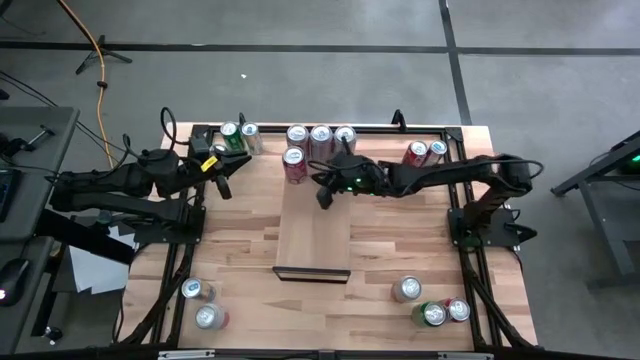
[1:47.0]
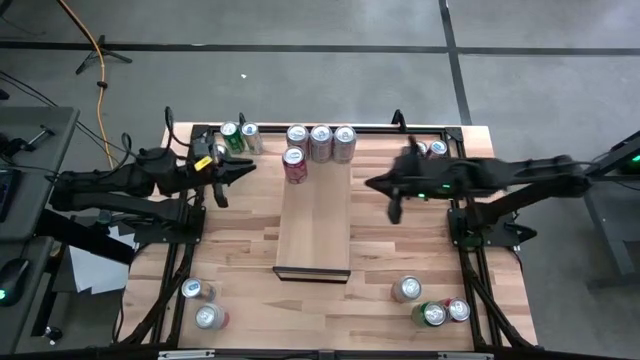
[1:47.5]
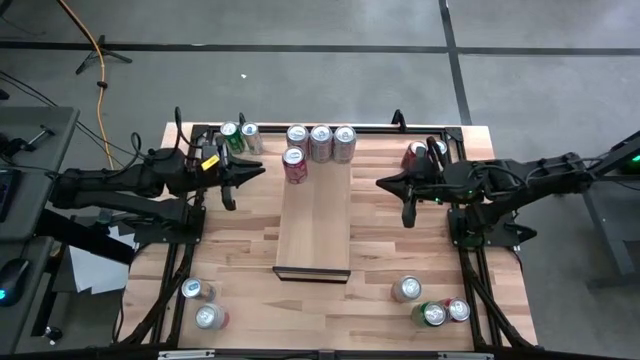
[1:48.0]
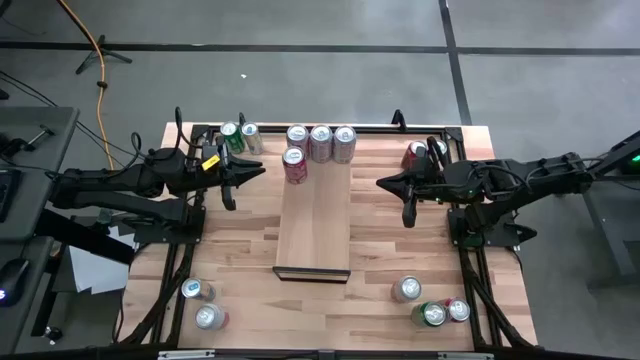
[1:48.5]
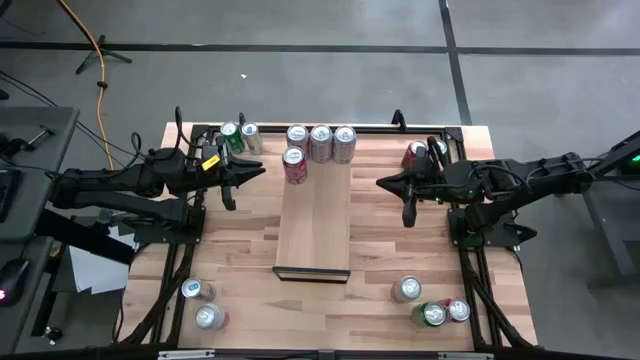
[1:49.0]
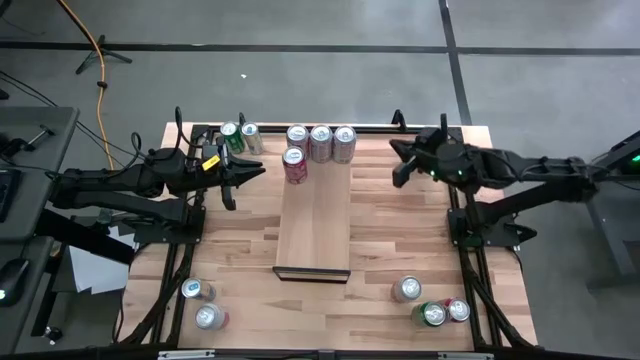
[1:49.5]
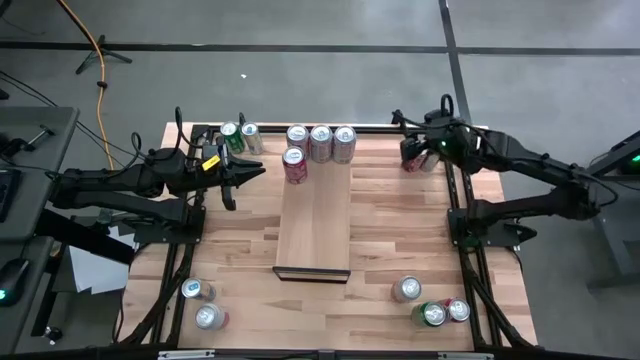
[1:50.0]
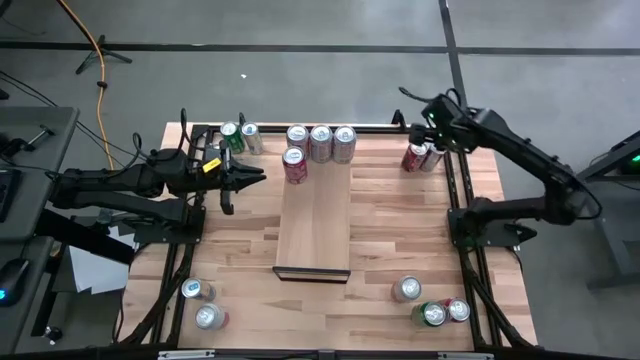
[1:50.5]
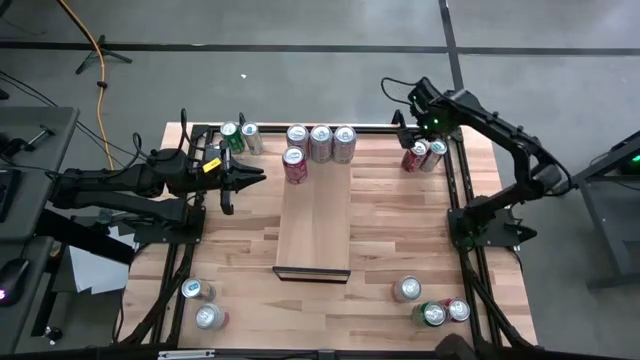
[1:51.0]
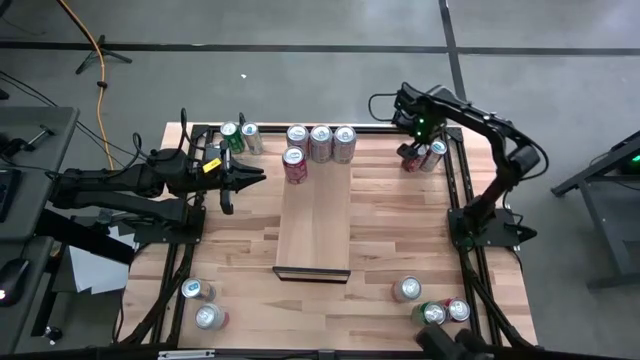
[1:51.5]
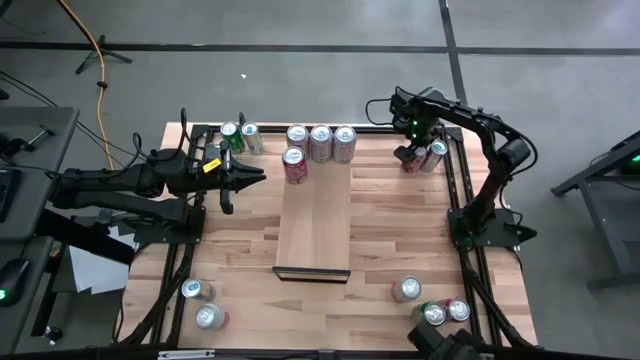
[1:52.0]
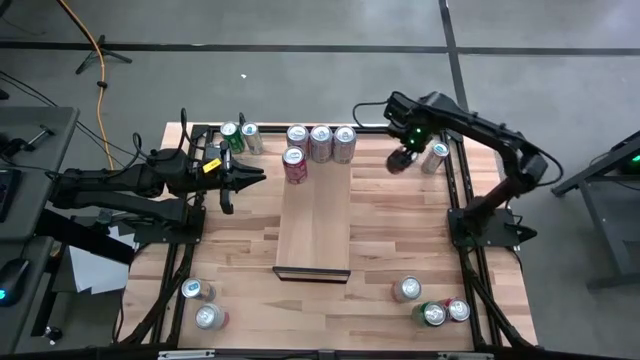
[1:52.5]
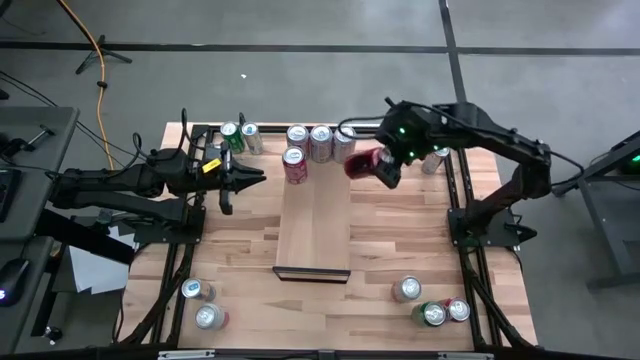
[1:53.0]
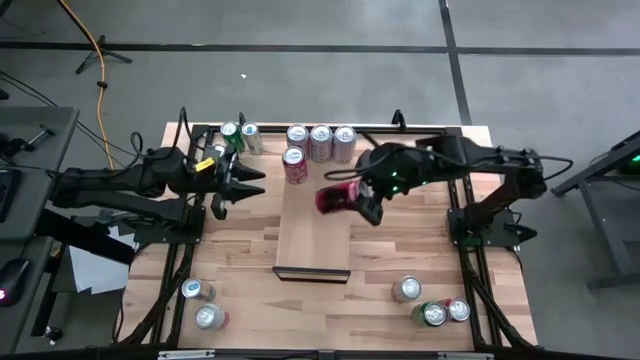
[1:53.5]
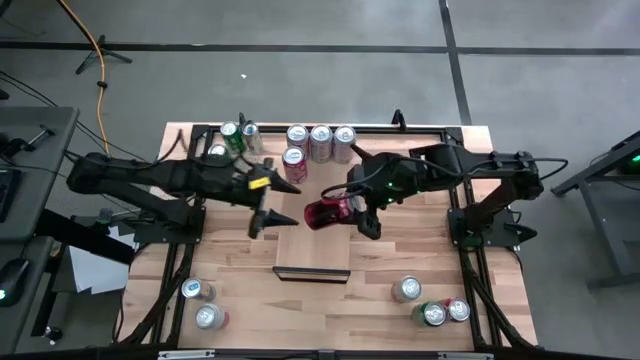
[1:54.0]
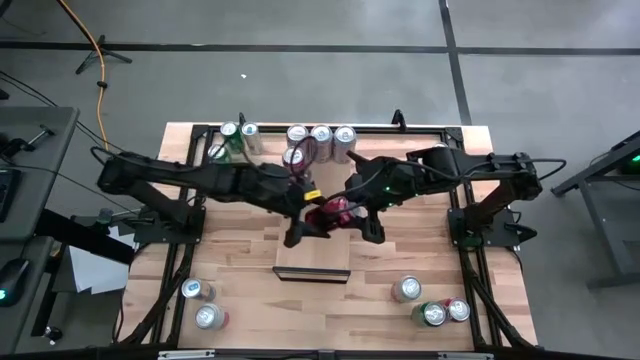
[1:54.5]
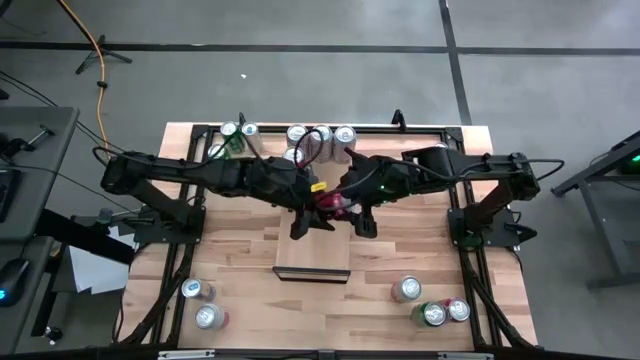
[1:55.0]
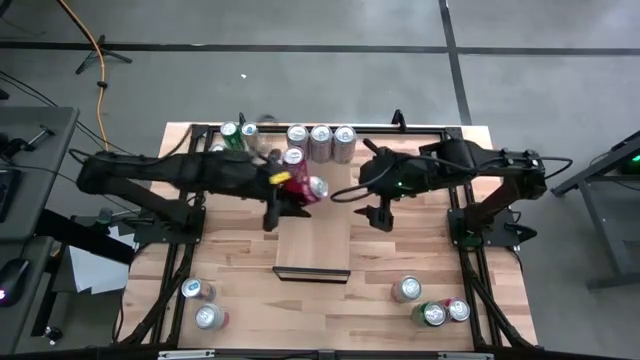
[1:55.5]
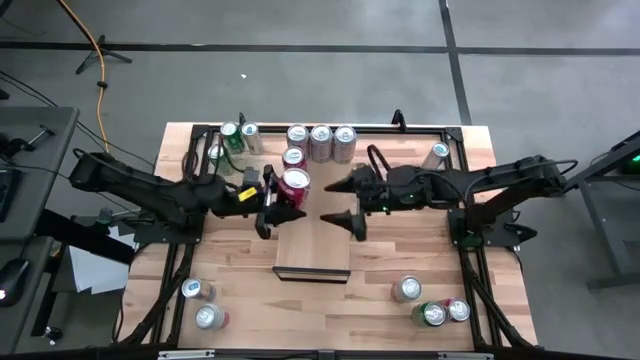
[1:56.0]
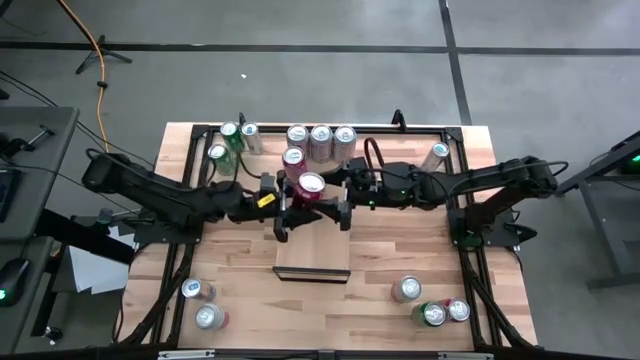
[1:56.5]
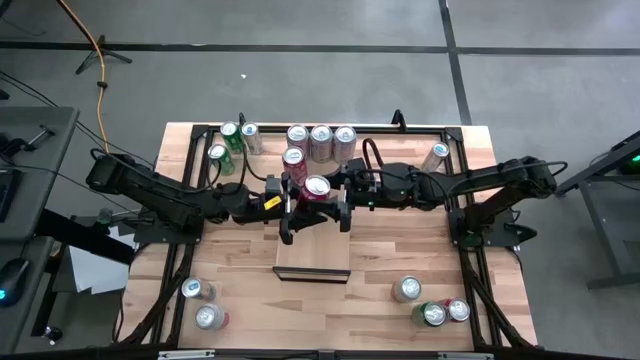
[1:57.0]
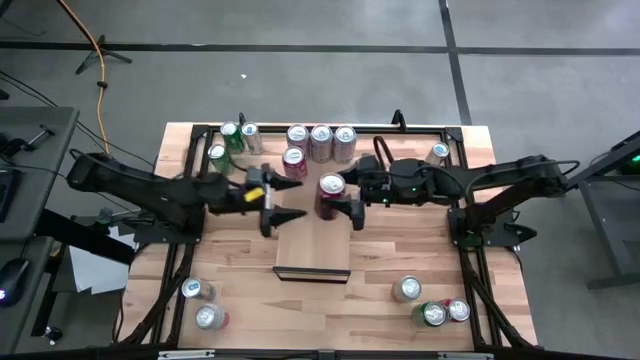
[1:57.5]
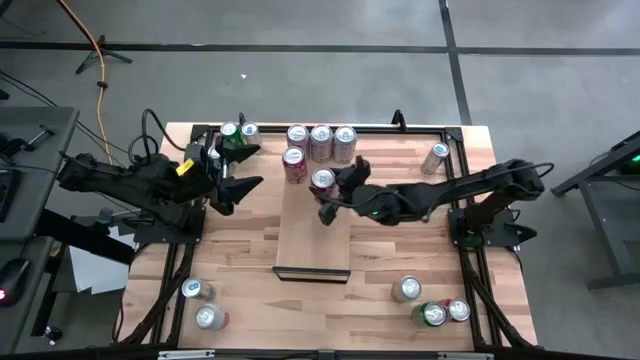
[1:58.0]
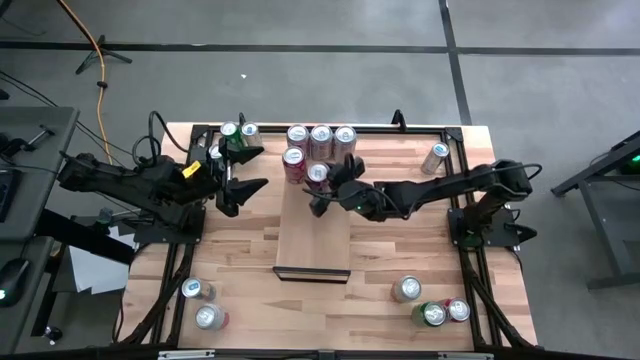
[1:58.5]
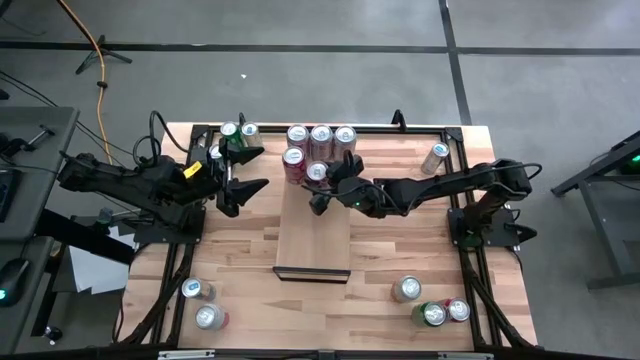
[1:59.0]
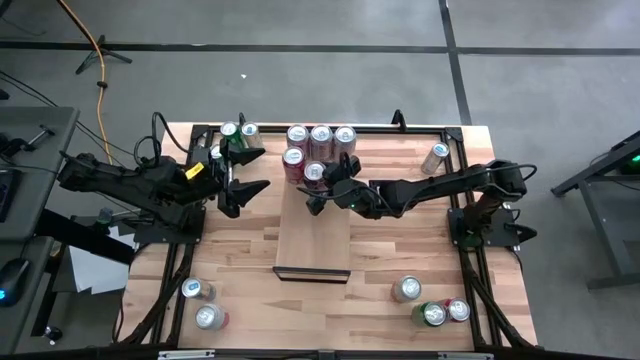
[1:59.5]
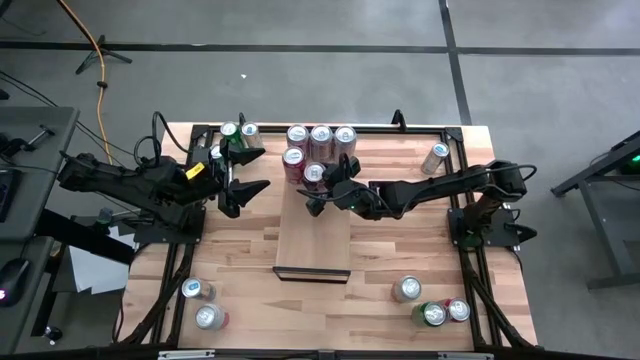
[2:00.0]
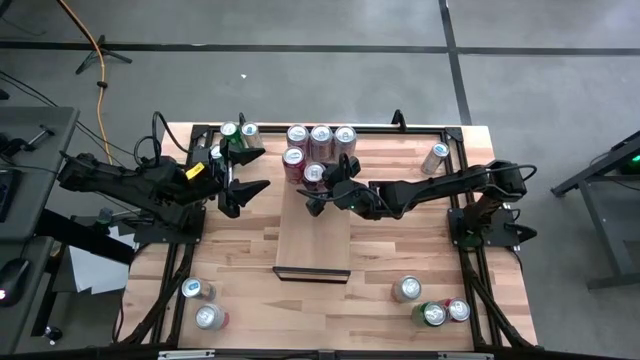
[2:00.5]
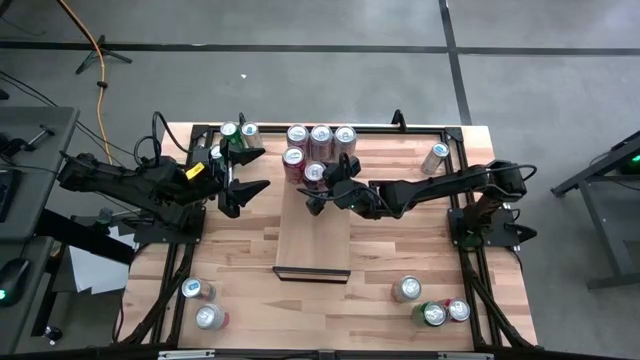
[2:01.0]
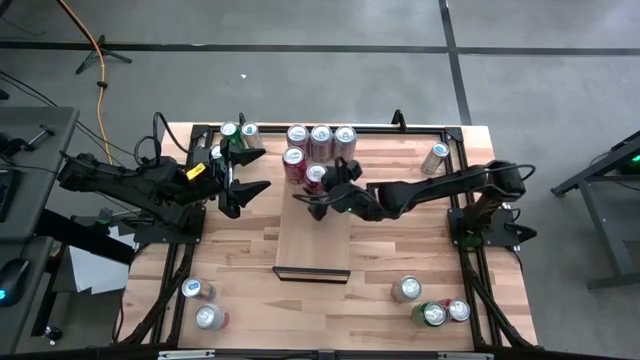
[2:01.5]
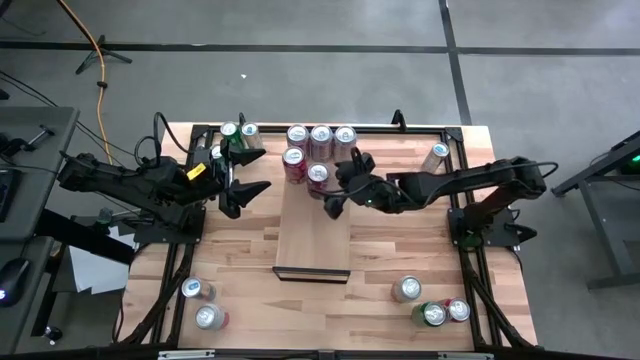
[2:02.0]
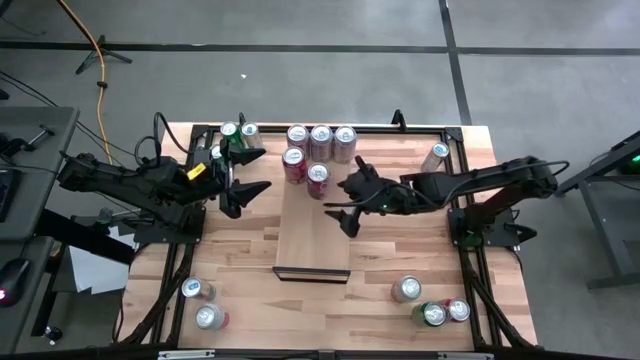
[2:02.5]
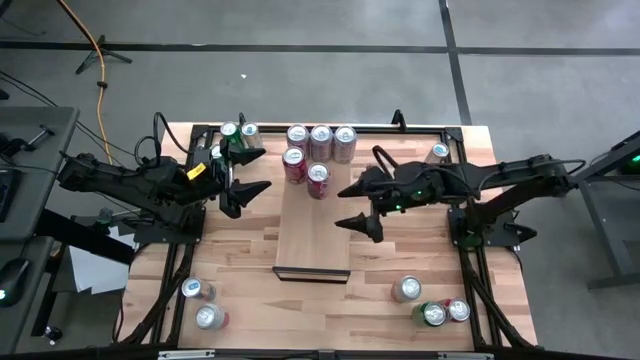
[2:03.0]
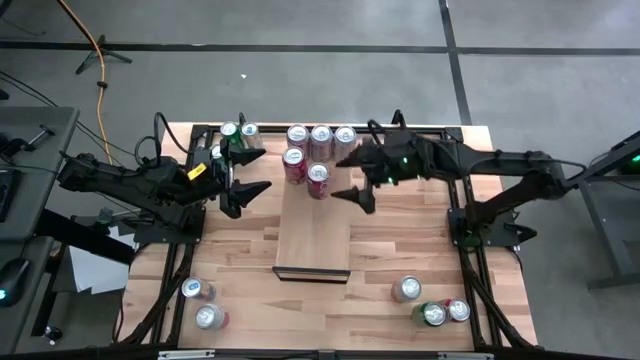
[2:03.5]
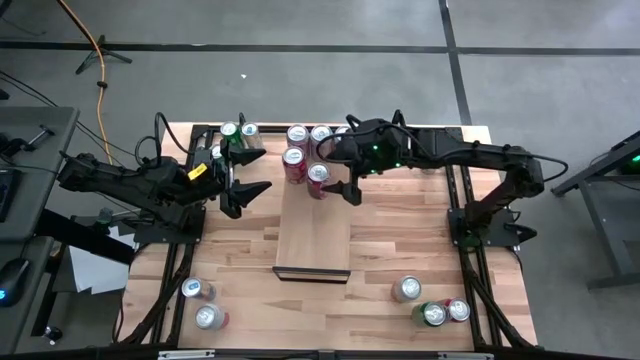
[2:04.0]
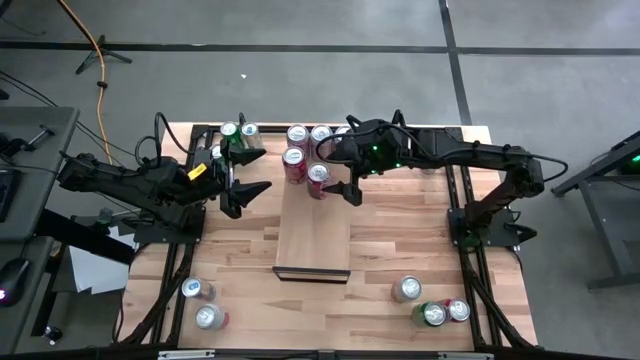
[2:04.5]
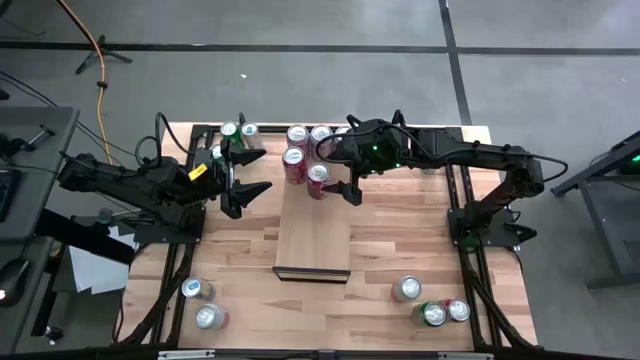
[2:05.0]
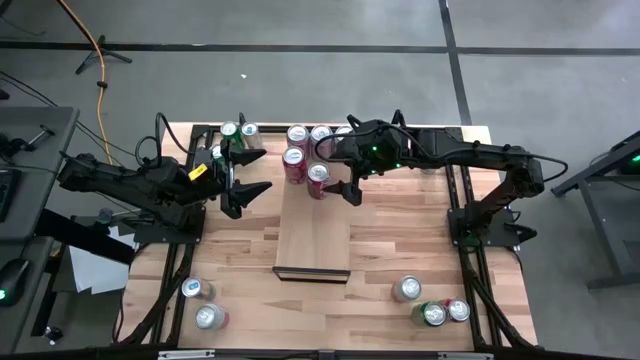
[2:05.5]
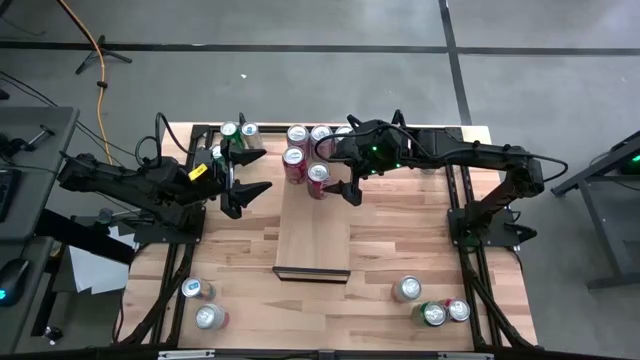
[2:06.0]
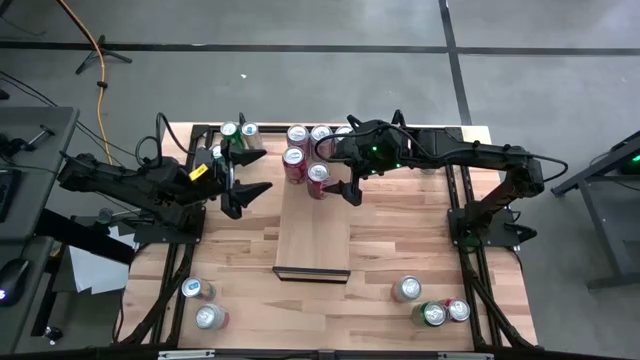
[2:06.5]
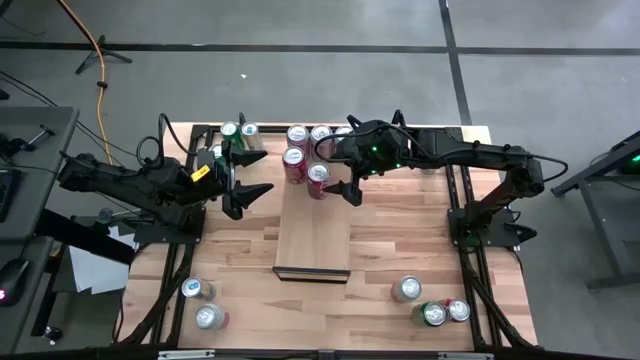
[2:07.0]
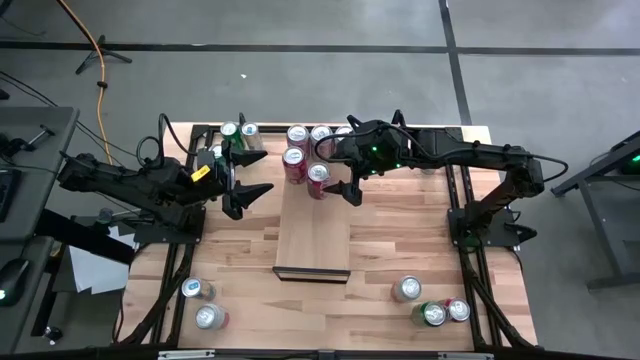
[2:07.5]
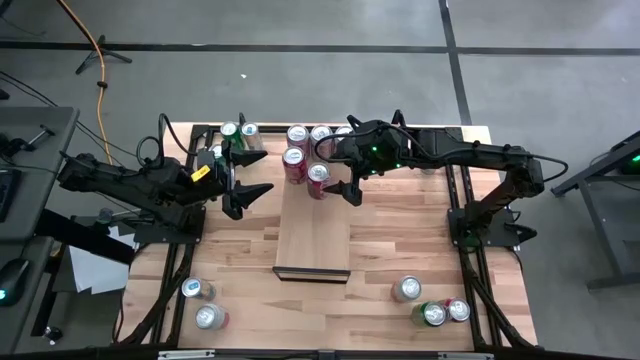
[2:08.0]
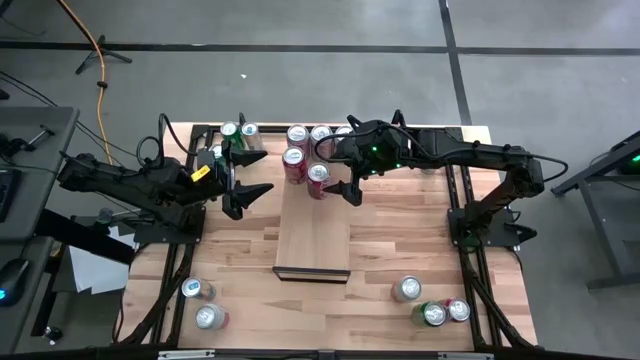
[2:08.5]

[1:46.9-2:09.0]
Task: Place canned beverage on shelf
Put the top red soda can on the shelf
